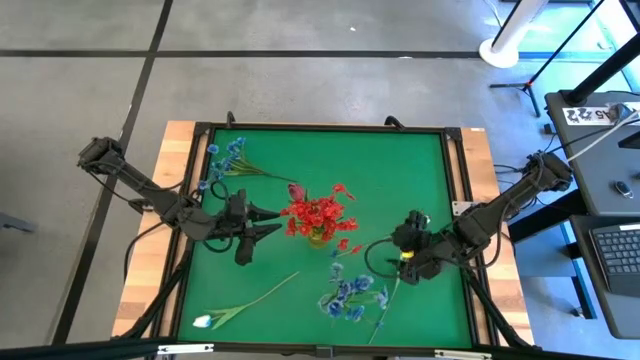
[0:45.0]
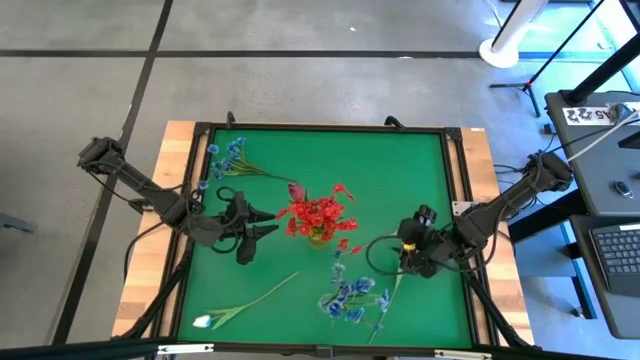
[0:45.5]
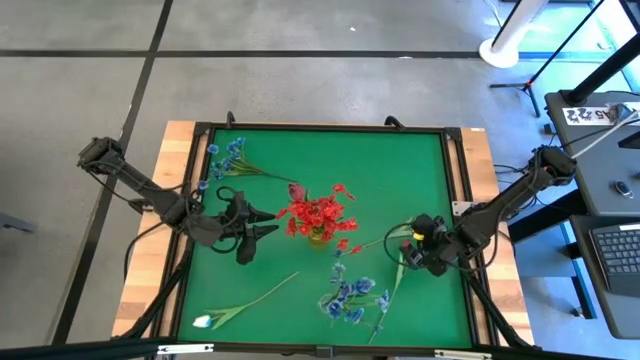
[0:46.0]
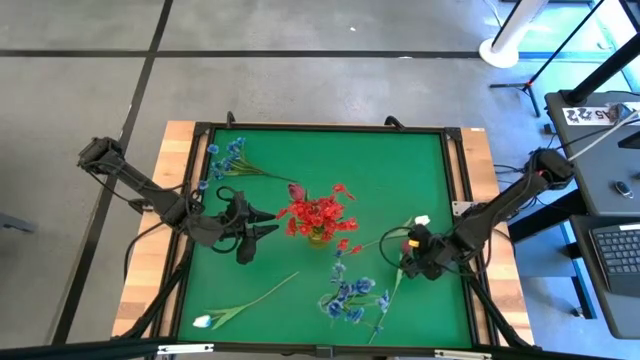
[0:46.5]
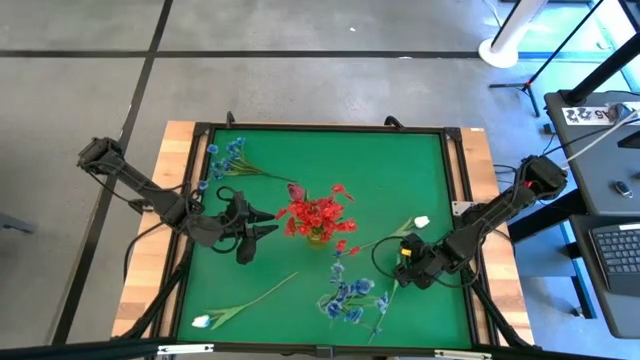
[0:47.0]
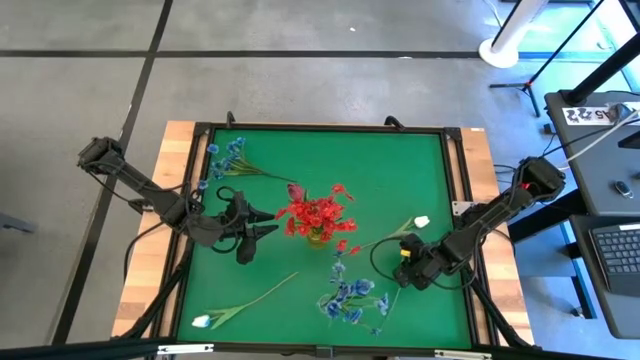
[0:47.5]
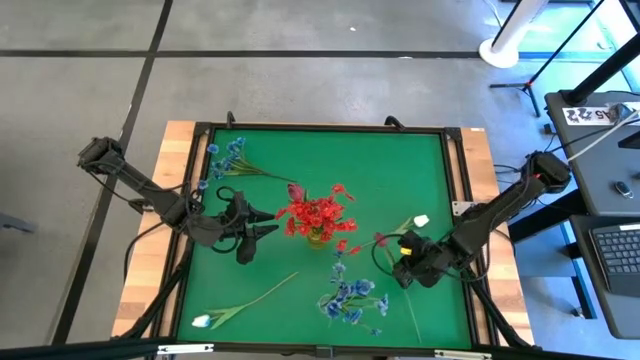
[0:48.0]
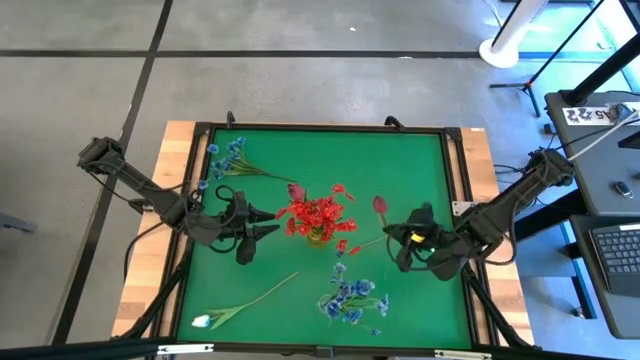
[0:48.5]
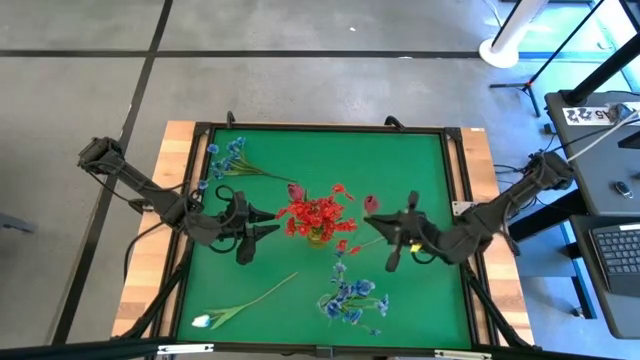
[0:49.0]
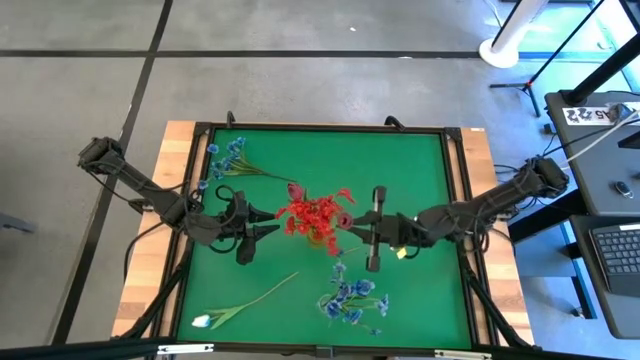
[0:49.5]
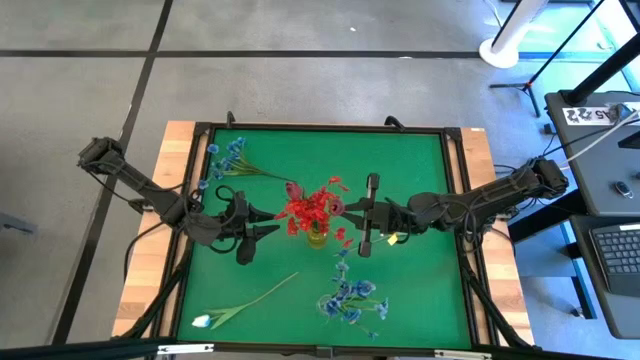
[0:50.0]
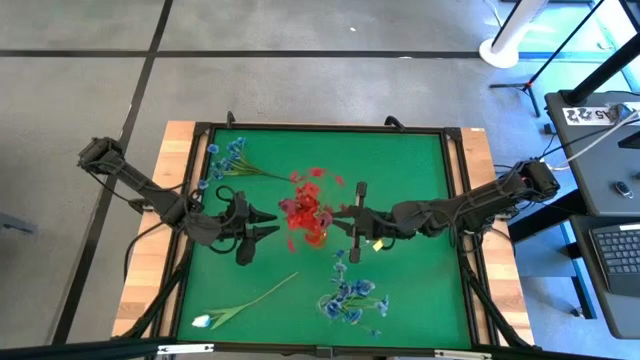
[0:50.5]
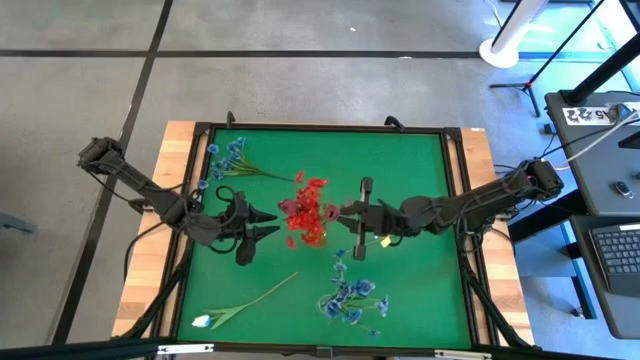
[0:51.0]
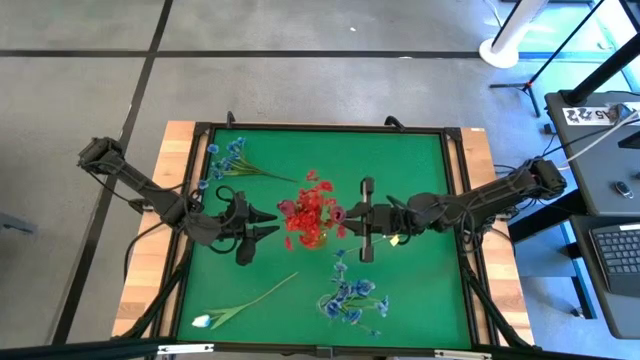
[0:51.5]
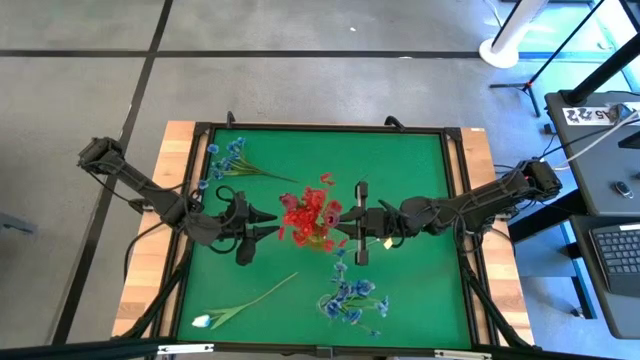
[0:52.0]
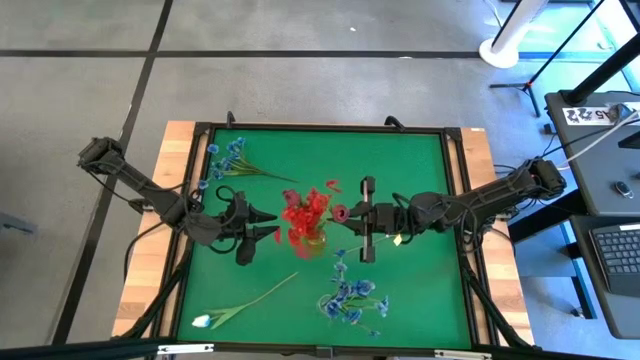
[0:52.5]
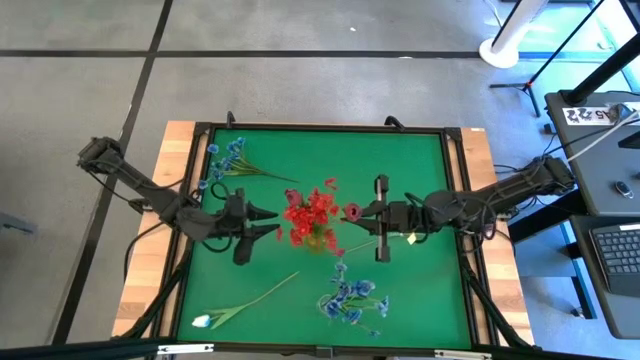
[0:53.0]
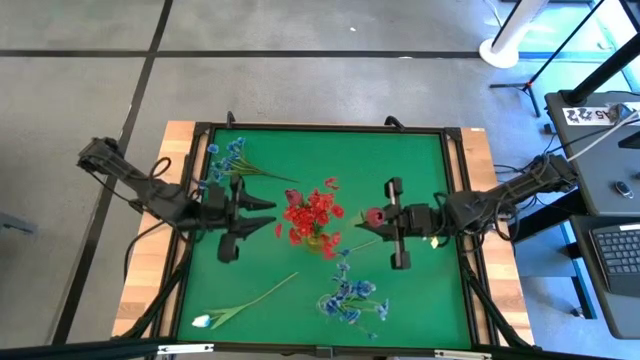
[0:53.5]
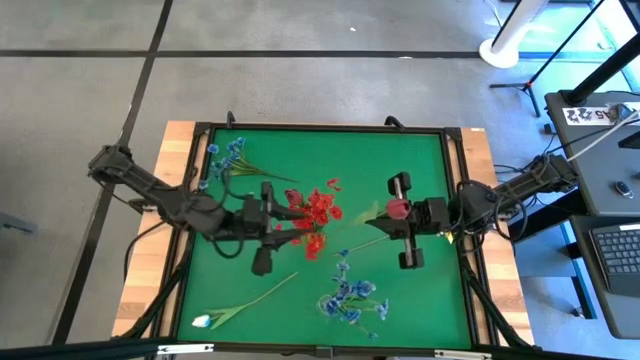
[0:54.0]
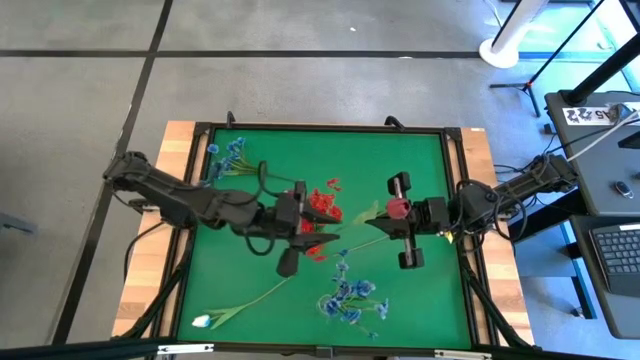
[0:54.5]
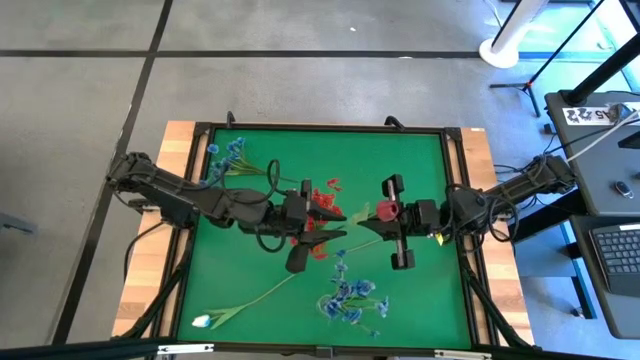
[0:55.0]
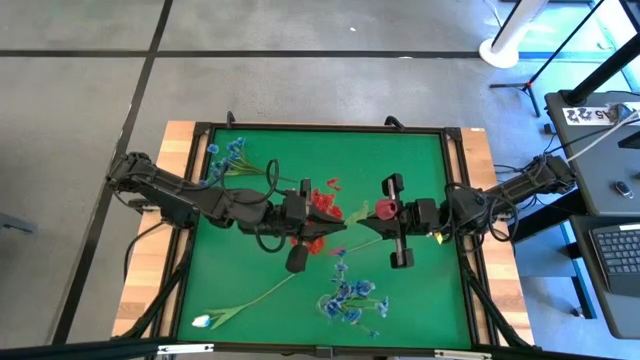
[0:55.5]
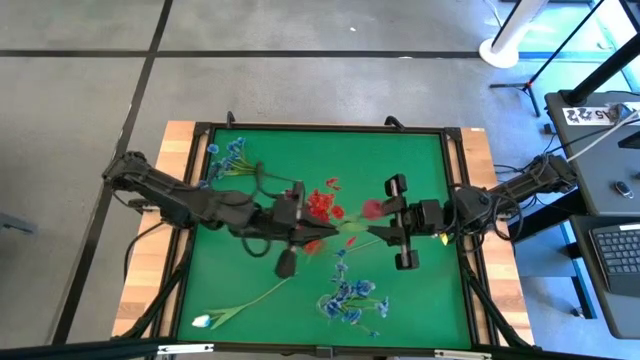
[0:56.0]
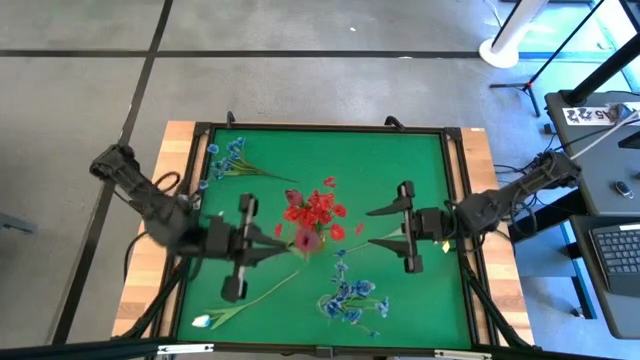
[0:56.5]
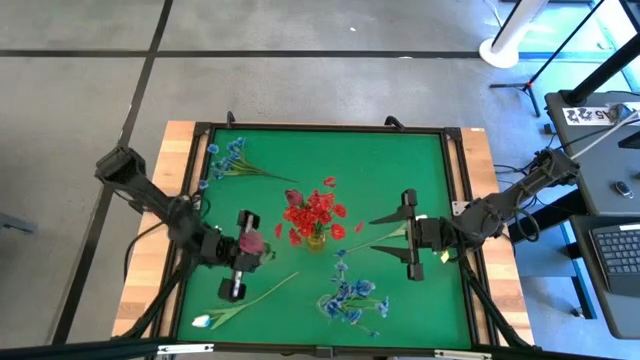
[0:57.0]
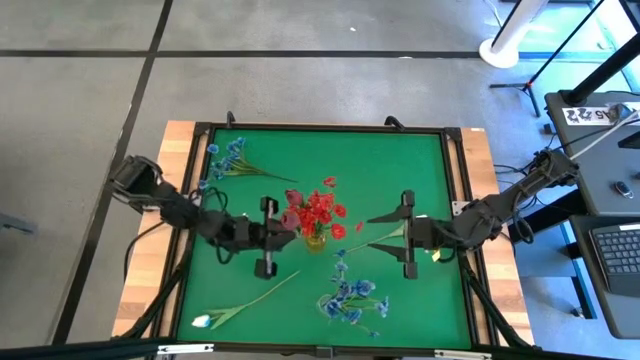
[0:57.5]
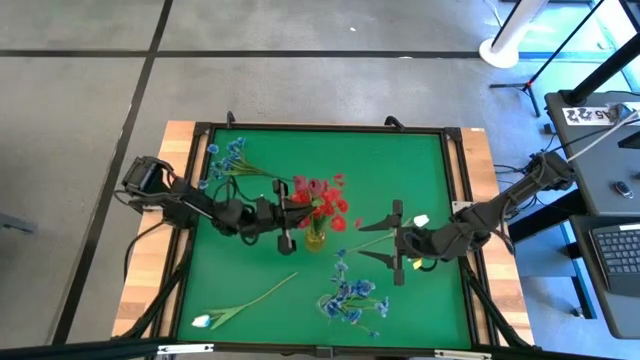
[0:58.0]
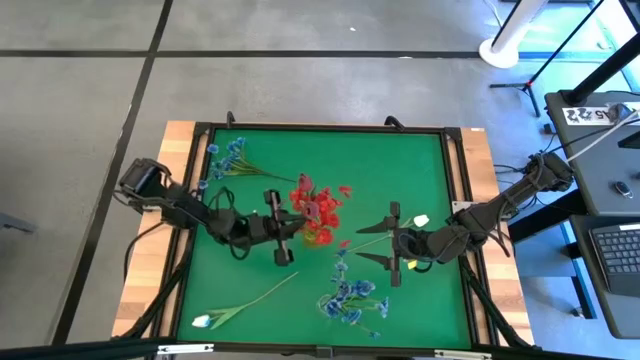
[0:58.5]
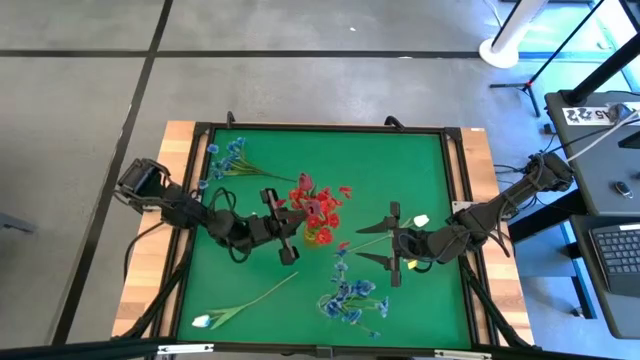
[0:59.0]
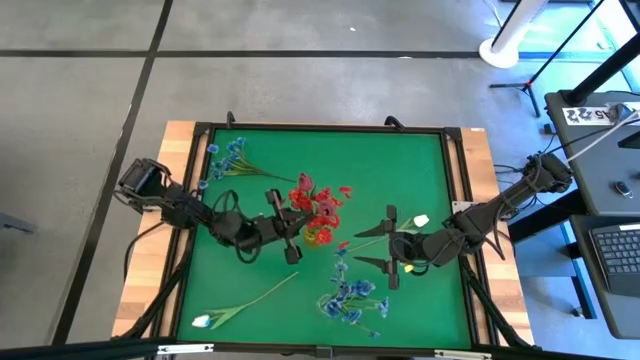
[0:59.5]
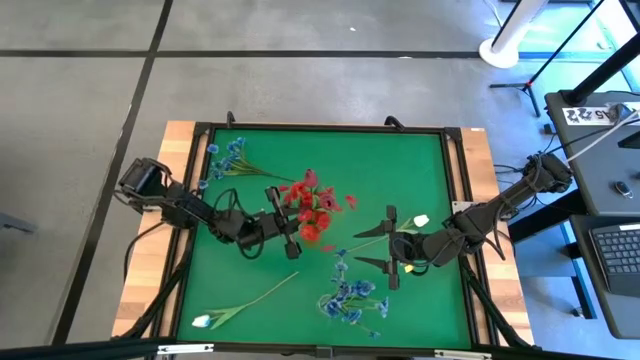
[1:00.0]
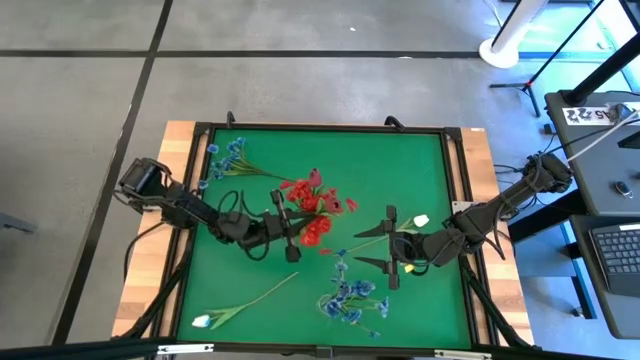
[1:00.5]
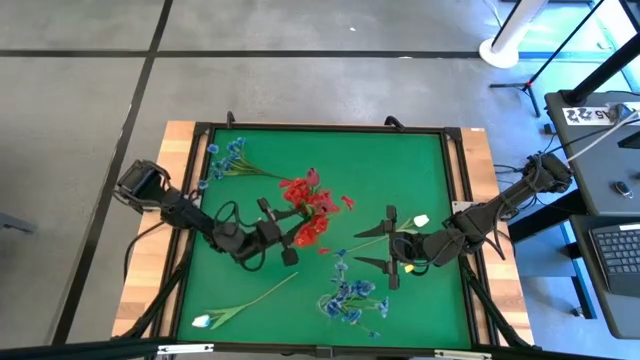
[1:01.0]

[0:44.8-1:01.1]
Task: Sort flowers into vase by color
Put the dark red tulip into the yellow vase
